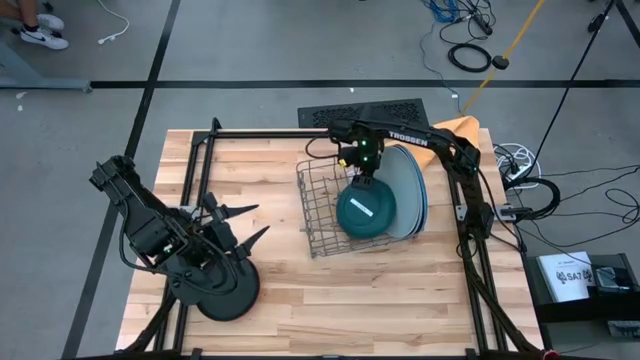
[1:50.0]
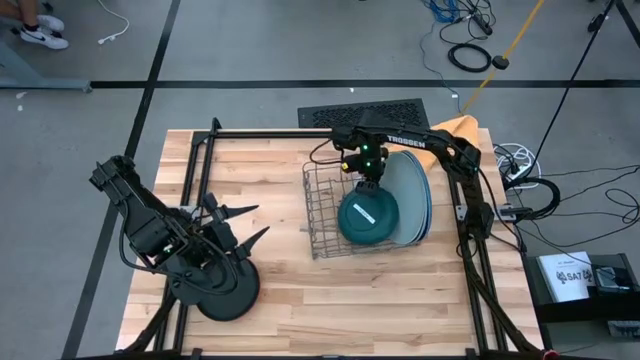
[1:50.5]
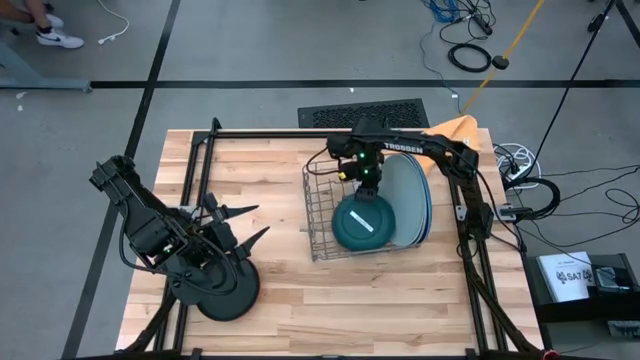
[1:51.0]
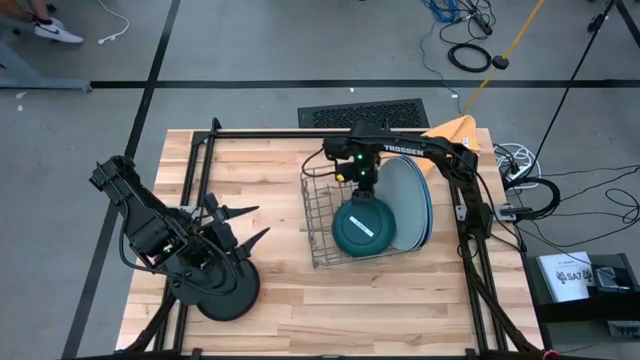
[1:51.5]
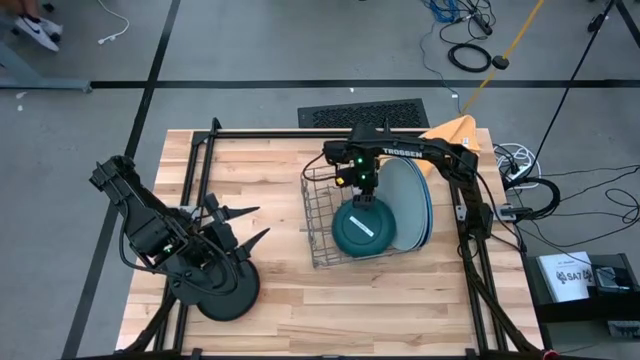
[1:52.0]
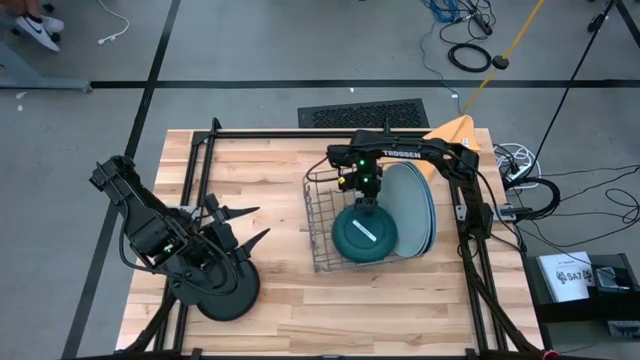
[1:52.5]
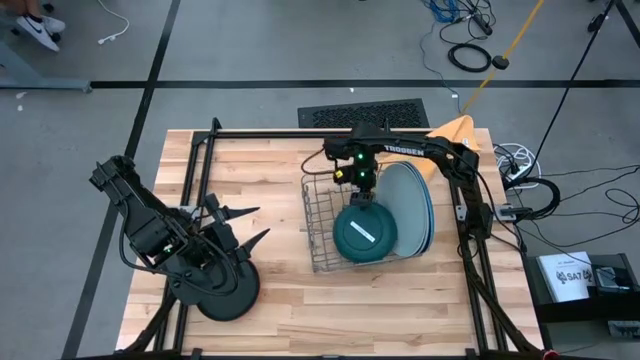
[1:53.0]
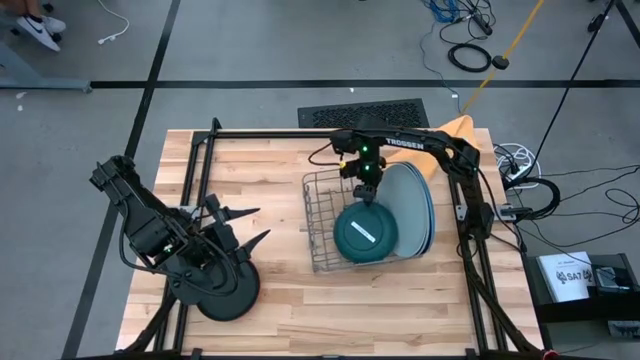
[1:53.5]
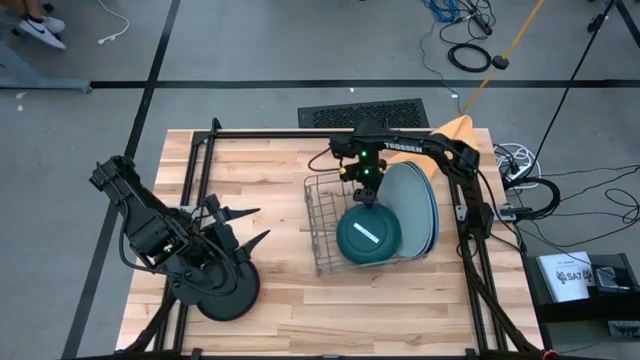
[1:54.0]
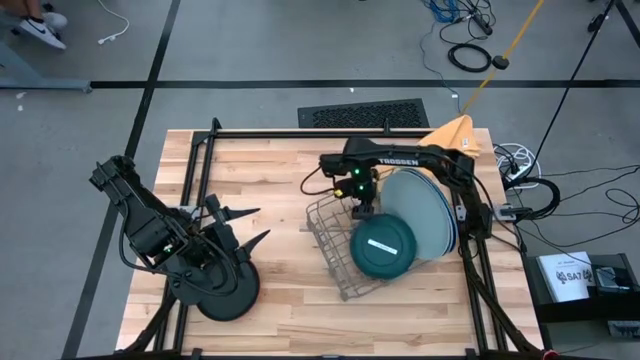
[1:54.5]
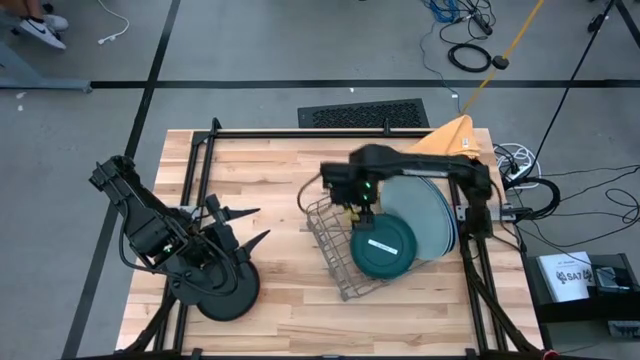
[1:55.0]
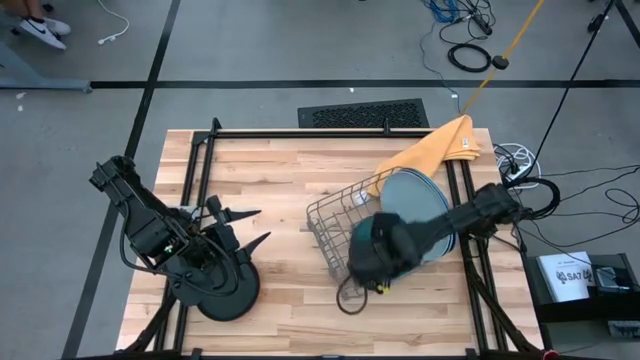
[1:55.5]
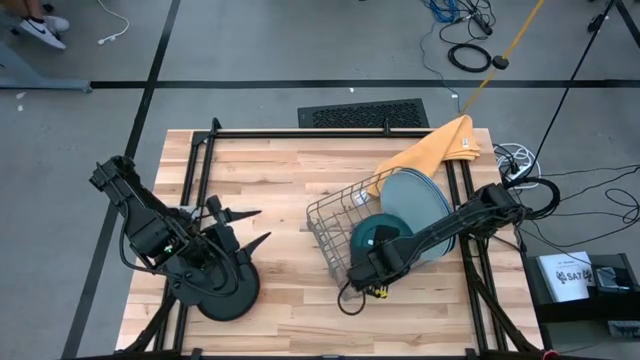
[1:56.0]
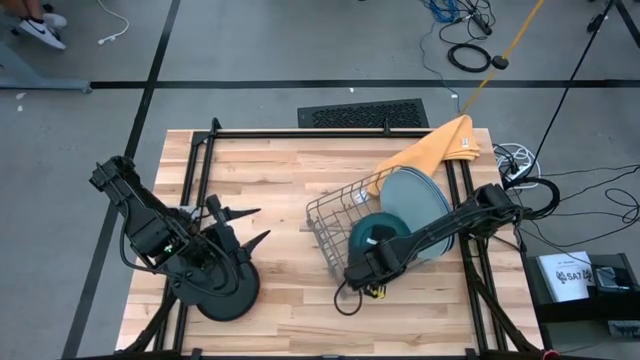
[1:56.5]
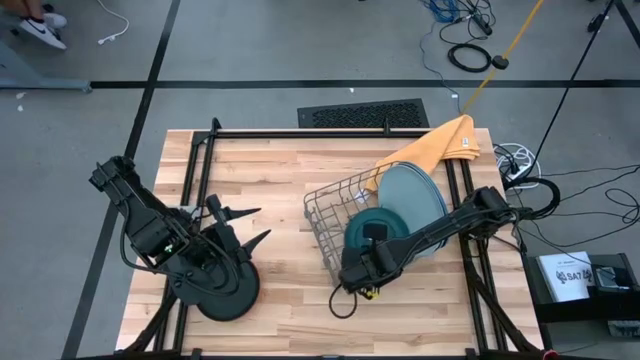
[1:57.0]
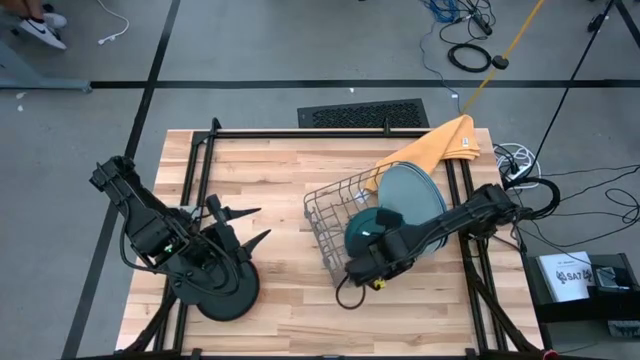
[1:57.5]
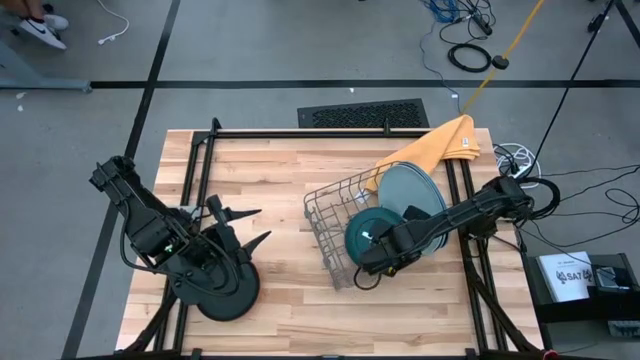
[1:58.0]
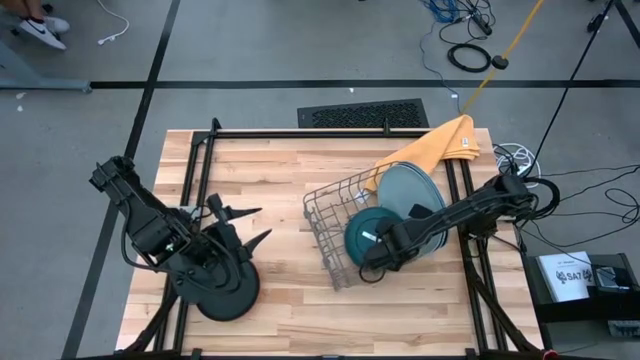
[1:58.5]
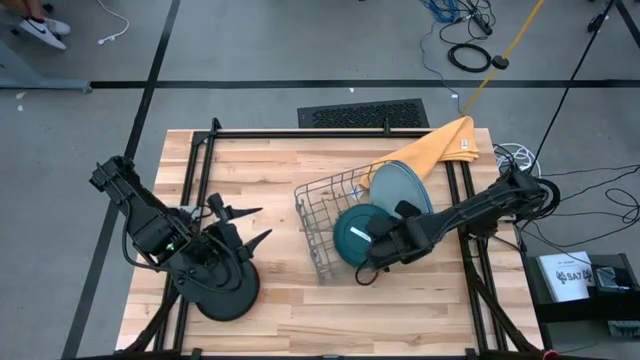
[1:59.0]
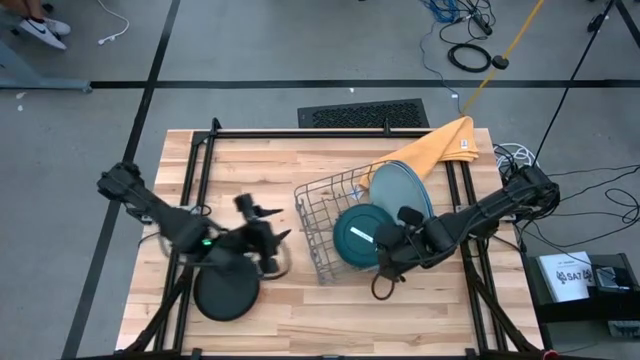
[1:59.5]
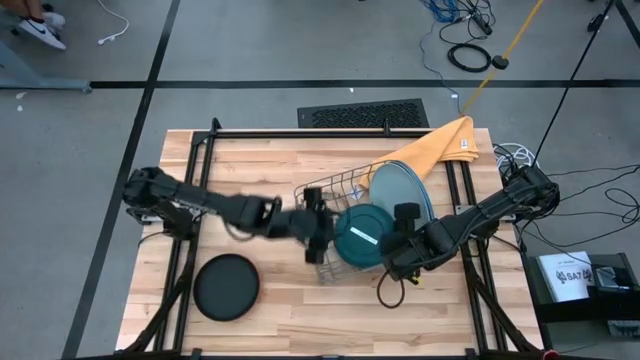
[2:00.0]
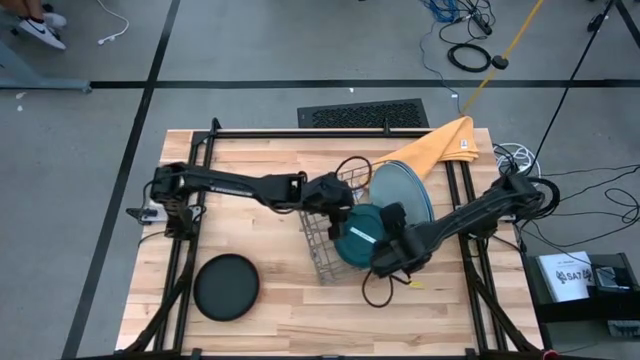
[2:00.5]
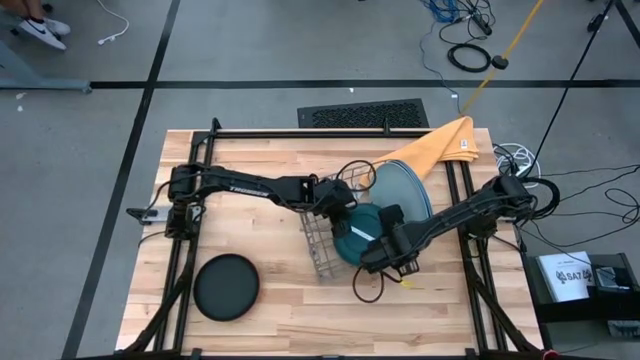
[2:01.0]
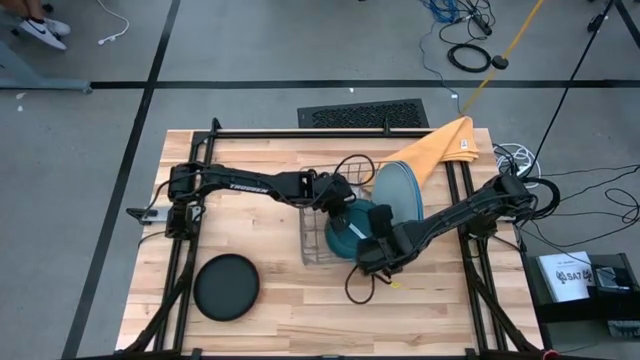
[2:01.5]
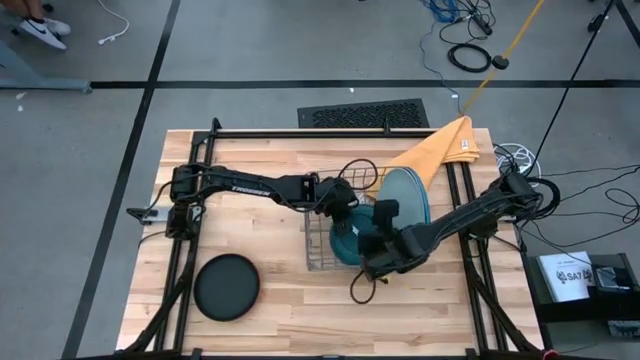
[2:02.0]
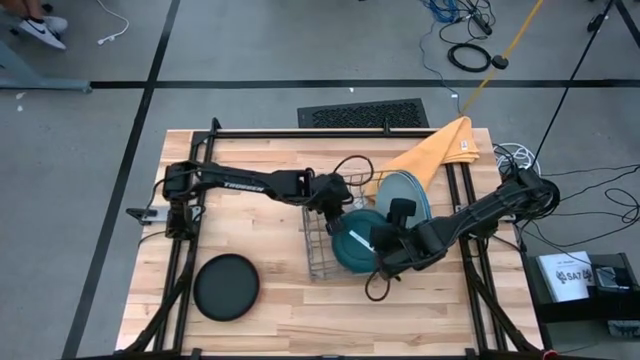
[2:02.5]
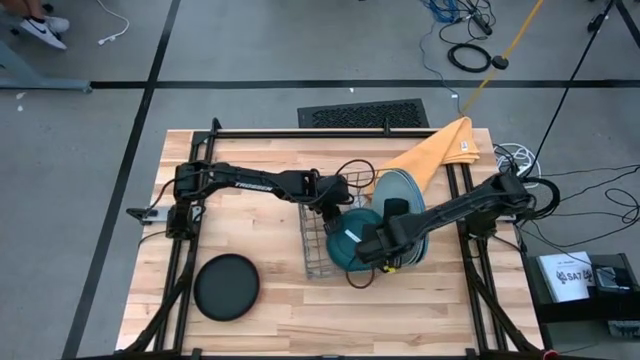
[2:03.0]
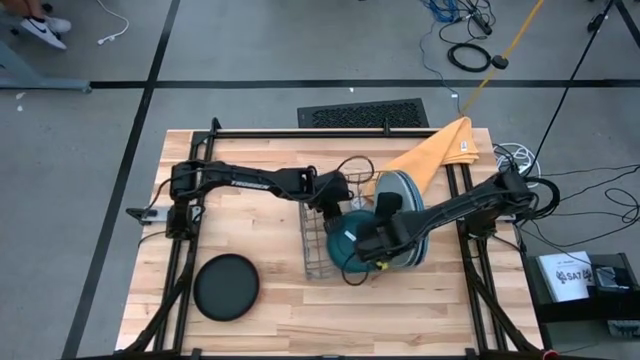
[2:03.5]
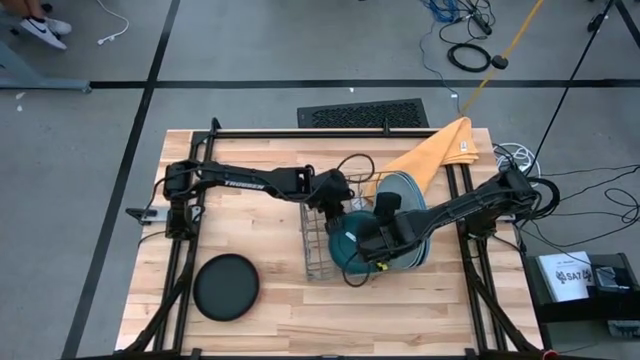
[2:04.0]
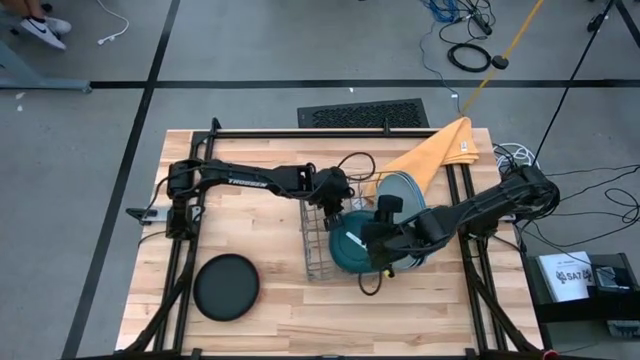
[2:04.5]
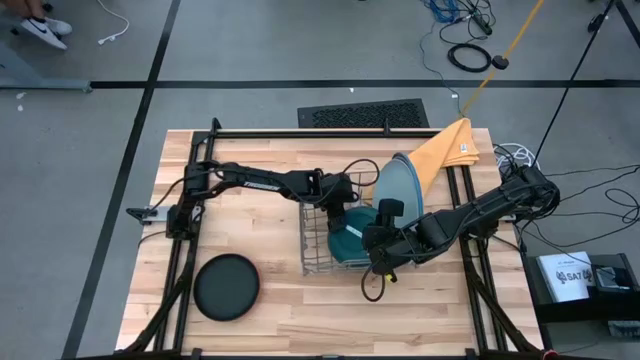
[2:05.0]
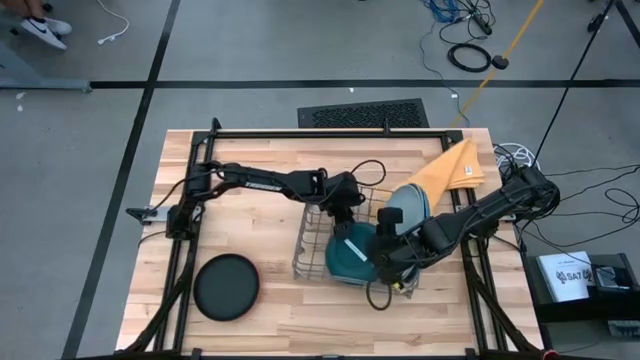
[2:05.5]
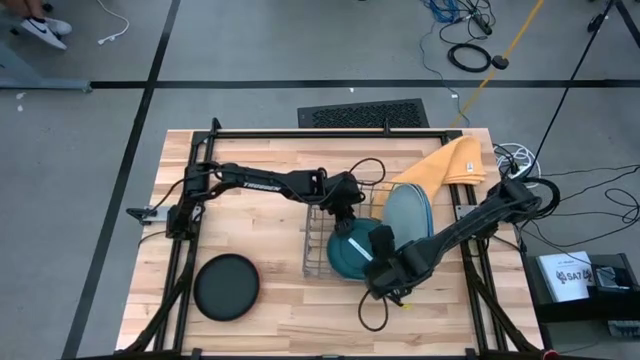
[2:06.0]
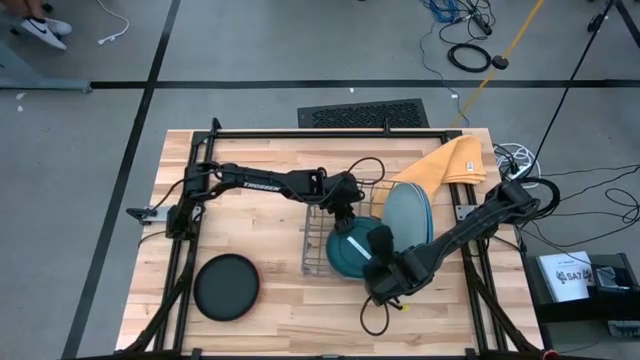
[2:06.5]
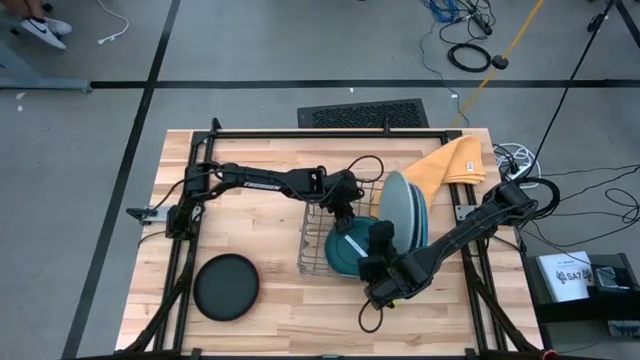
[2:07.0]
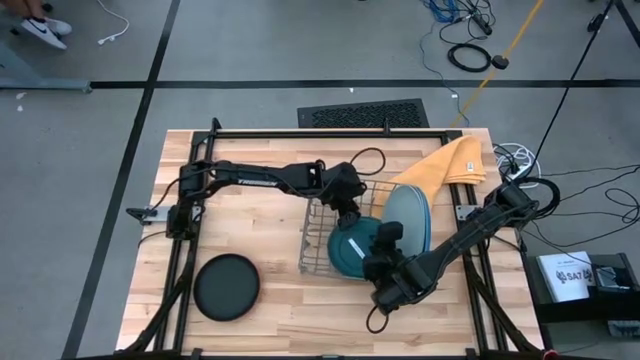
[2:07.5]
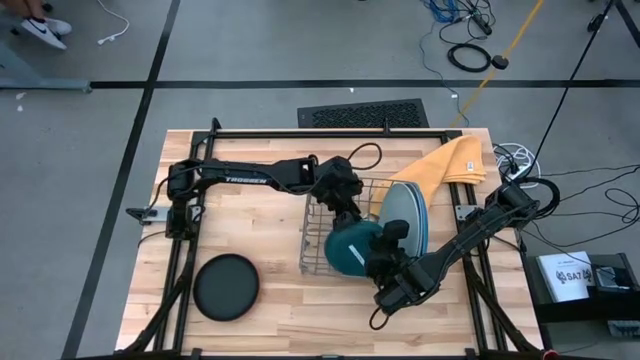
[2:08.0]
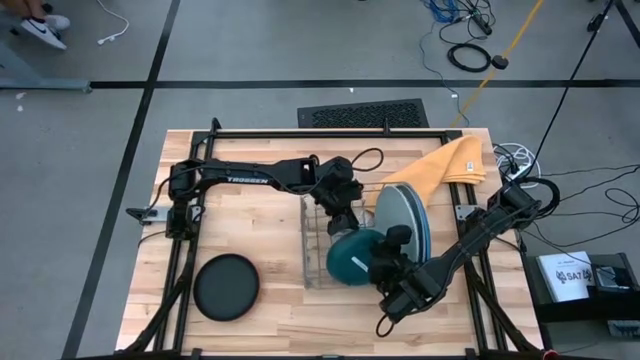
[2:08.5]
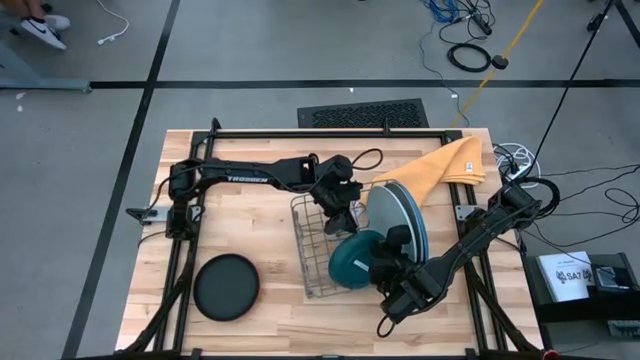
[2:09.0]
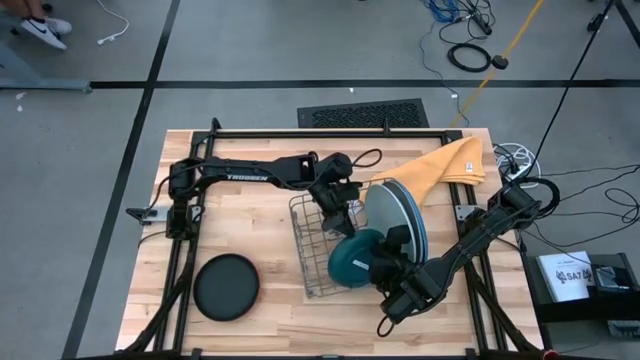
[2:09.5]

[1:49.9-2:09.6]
Task: Sort dishes
Put the dark green plate into the green dish rack

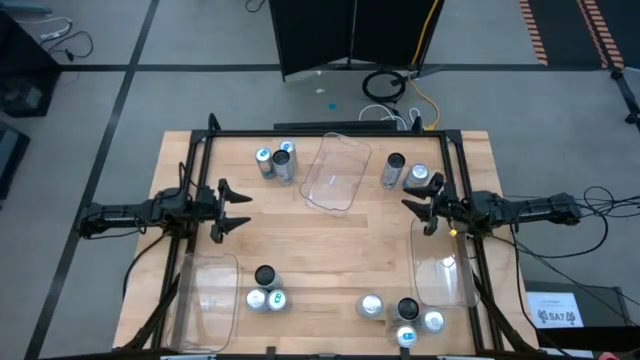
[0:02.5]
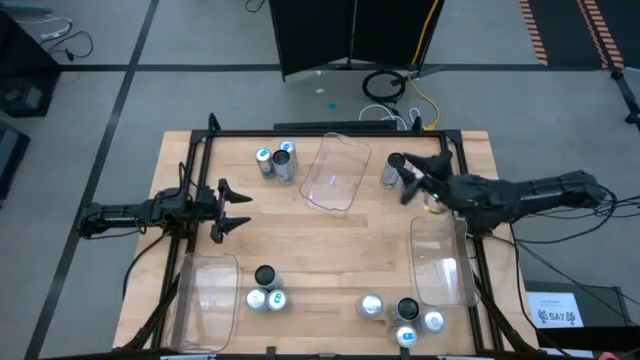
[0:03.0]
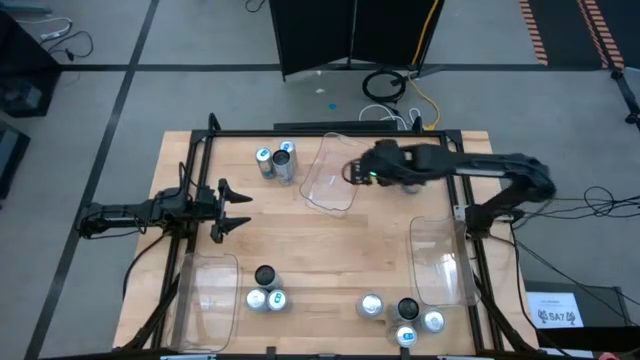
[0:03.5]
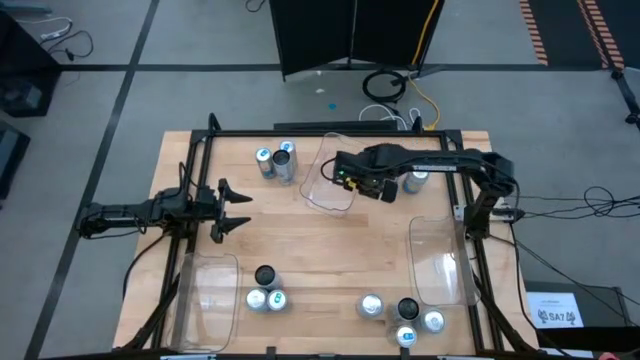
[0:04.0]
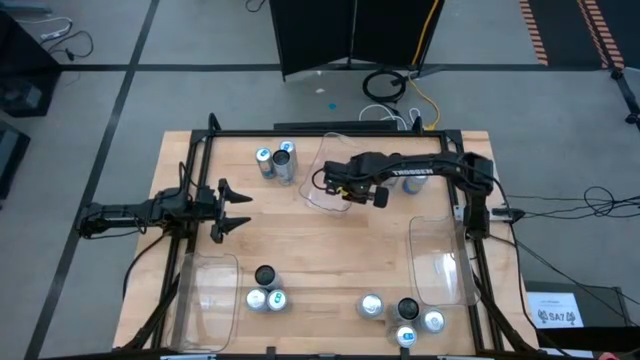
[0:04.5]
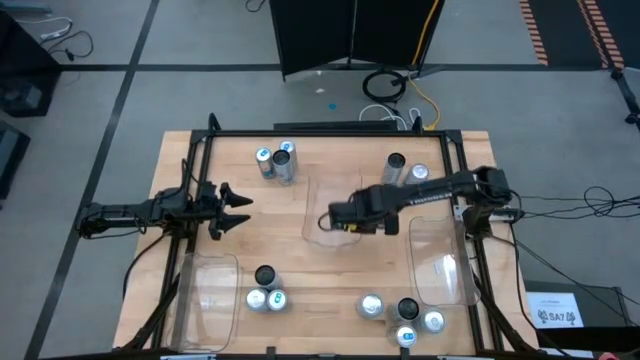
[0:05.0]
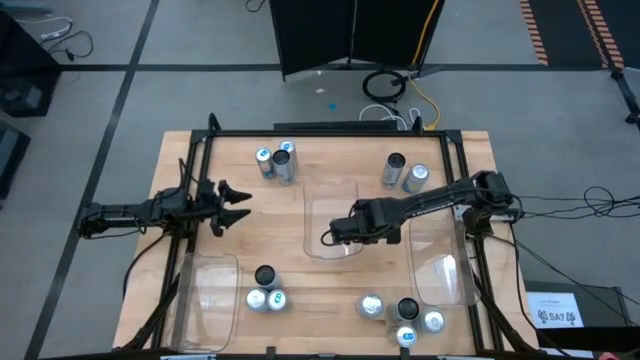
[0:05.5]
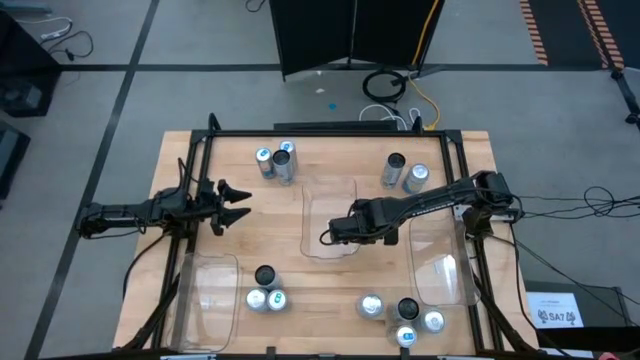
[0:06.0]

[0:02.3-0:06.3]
Task: Sort soda cans
Move the top transparent bin to the center of the table
